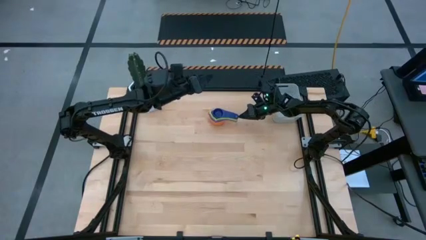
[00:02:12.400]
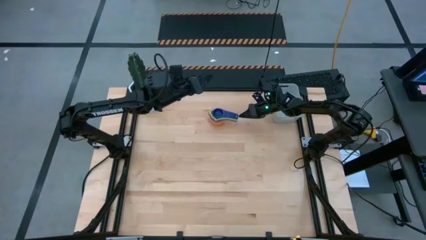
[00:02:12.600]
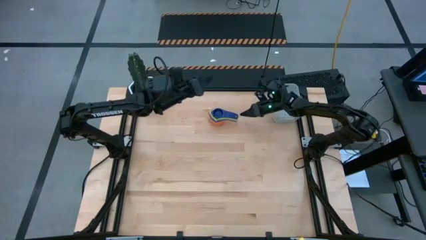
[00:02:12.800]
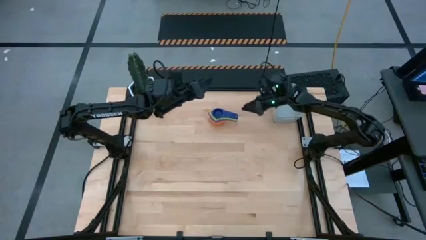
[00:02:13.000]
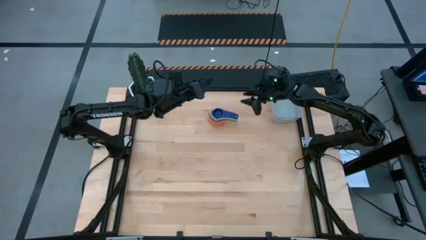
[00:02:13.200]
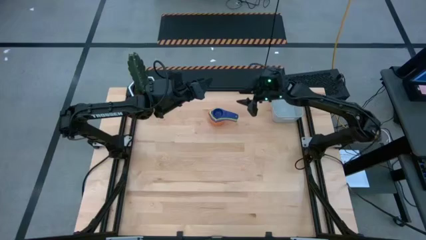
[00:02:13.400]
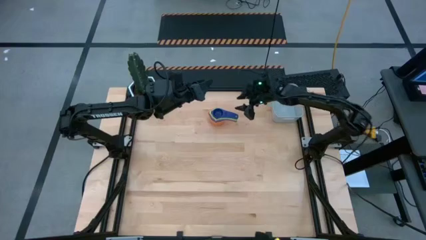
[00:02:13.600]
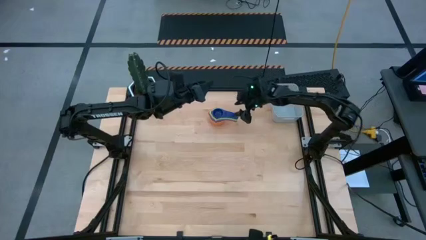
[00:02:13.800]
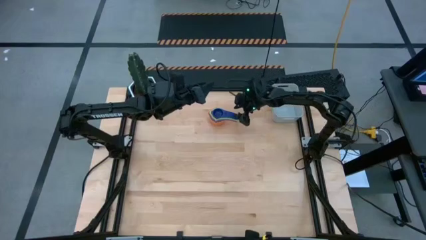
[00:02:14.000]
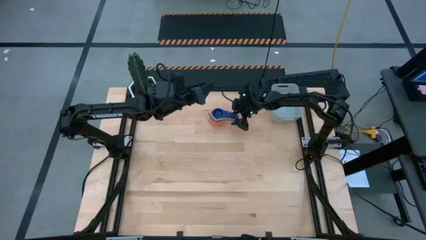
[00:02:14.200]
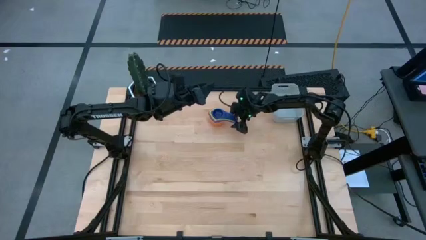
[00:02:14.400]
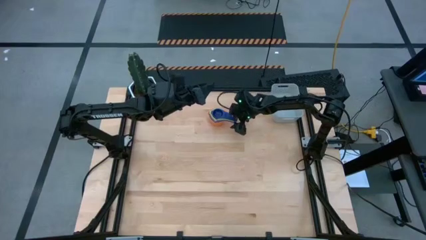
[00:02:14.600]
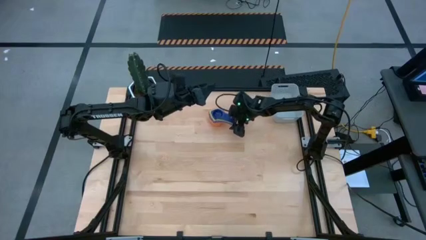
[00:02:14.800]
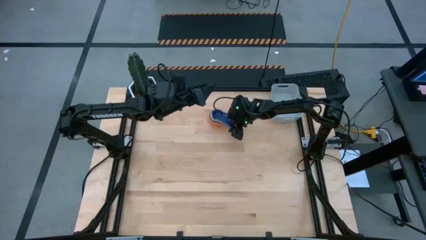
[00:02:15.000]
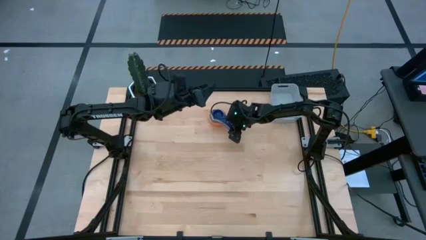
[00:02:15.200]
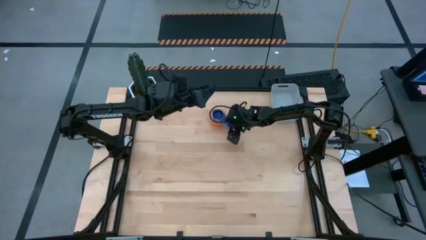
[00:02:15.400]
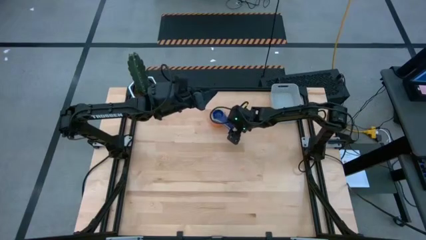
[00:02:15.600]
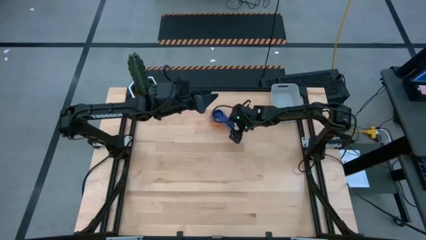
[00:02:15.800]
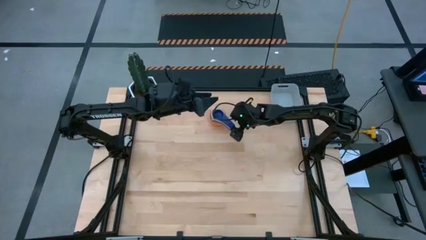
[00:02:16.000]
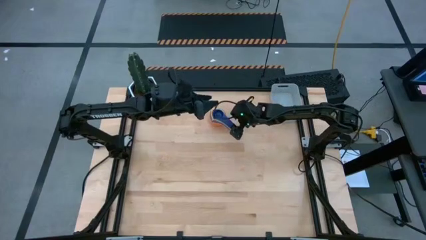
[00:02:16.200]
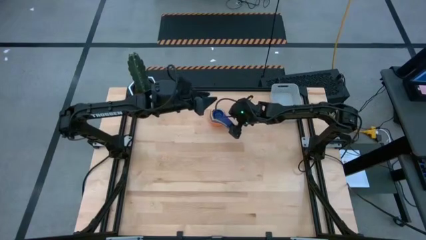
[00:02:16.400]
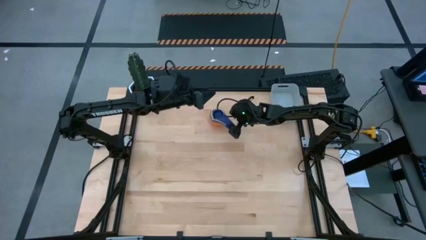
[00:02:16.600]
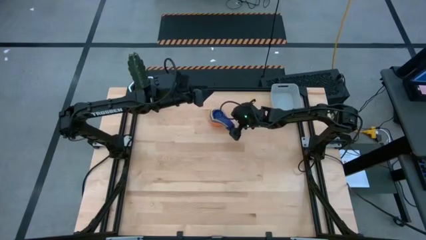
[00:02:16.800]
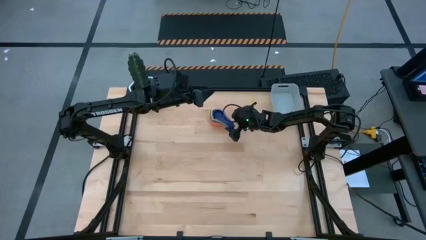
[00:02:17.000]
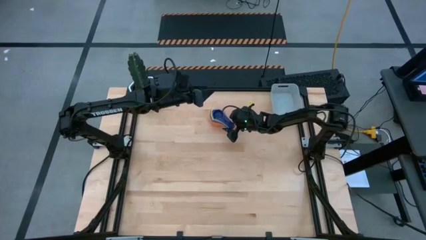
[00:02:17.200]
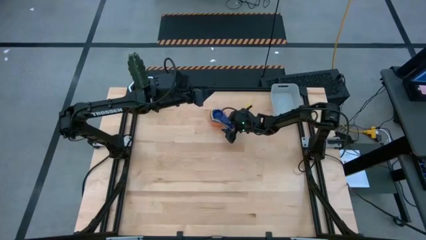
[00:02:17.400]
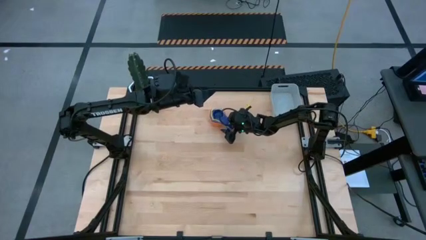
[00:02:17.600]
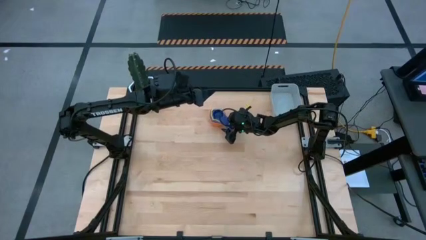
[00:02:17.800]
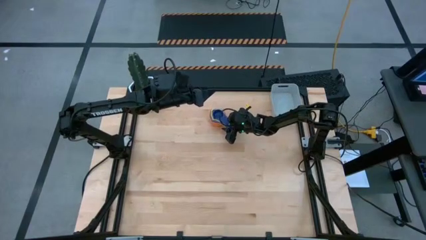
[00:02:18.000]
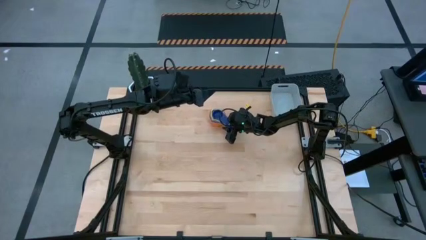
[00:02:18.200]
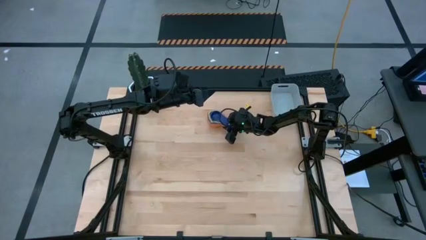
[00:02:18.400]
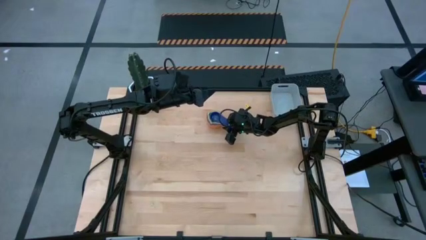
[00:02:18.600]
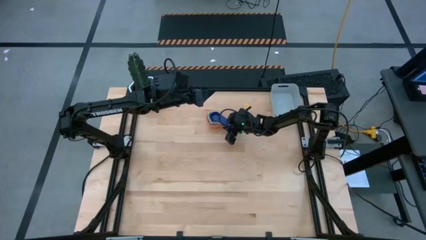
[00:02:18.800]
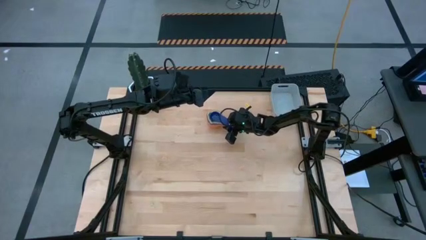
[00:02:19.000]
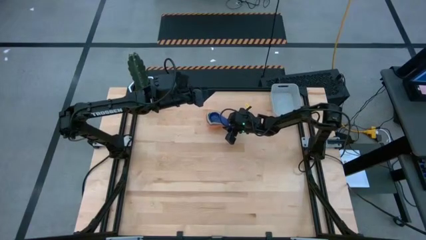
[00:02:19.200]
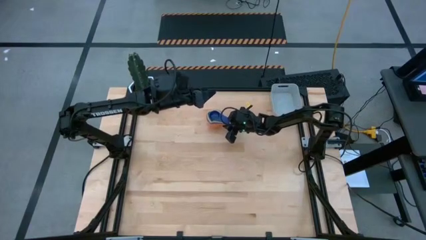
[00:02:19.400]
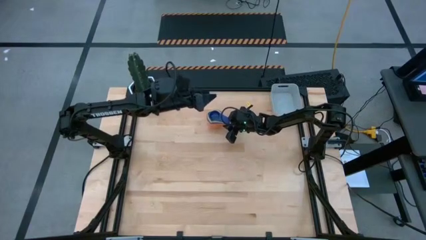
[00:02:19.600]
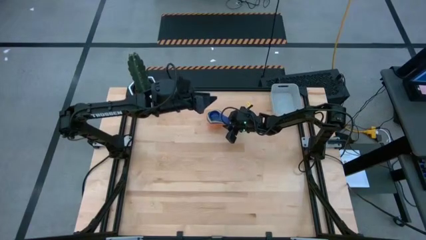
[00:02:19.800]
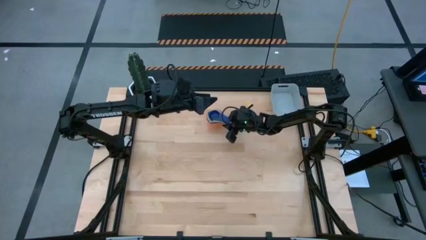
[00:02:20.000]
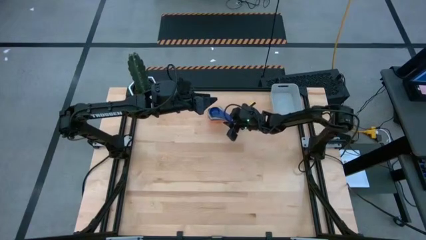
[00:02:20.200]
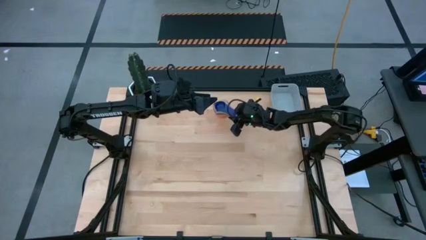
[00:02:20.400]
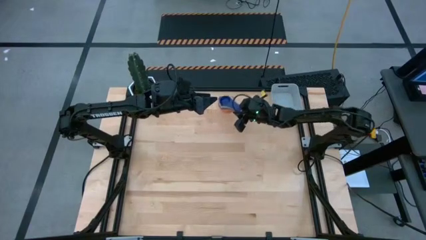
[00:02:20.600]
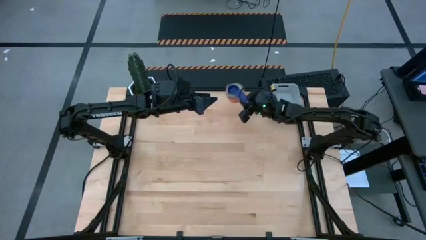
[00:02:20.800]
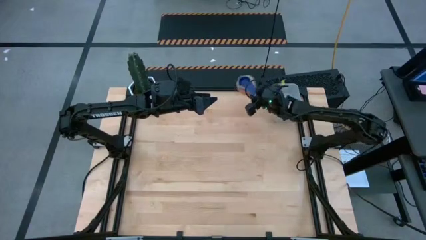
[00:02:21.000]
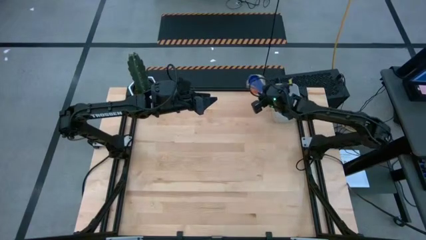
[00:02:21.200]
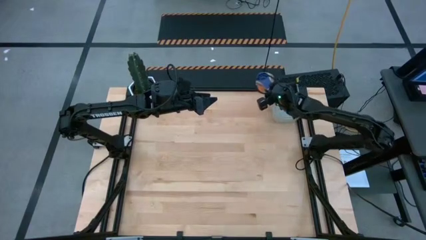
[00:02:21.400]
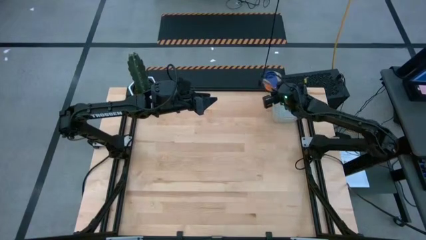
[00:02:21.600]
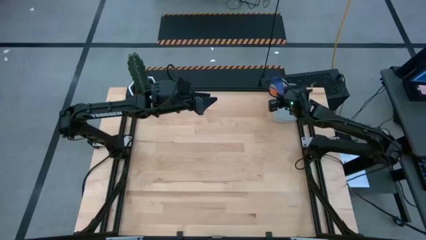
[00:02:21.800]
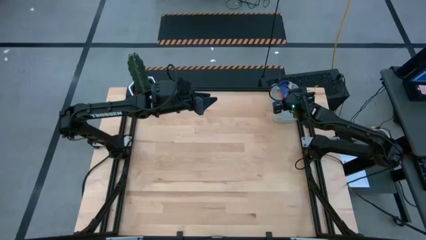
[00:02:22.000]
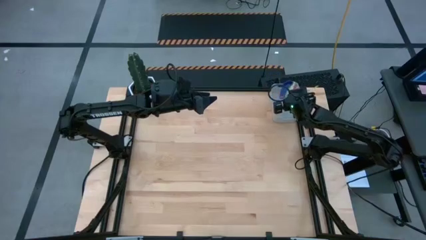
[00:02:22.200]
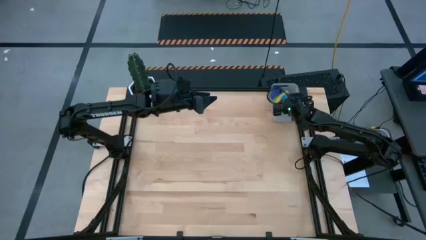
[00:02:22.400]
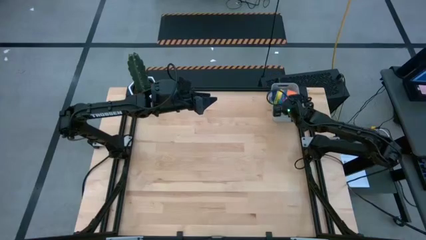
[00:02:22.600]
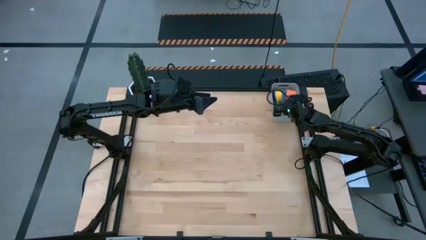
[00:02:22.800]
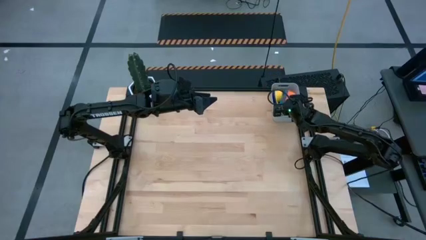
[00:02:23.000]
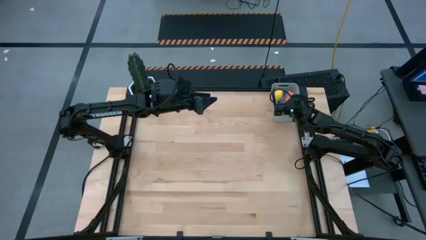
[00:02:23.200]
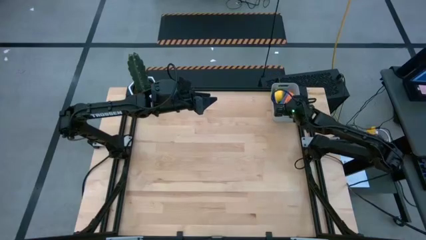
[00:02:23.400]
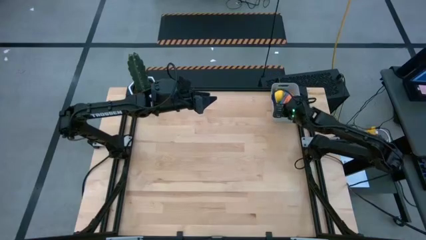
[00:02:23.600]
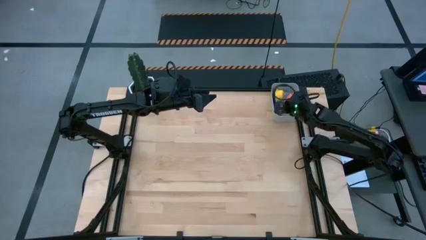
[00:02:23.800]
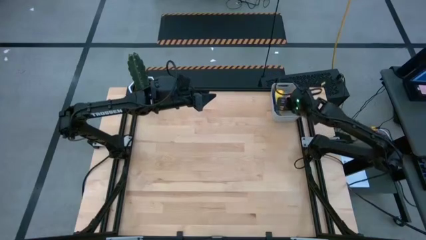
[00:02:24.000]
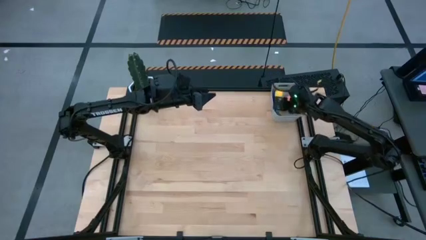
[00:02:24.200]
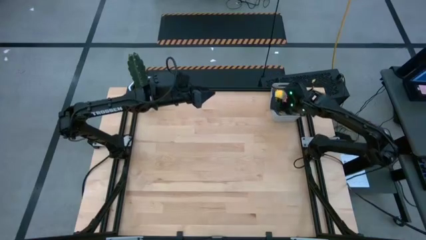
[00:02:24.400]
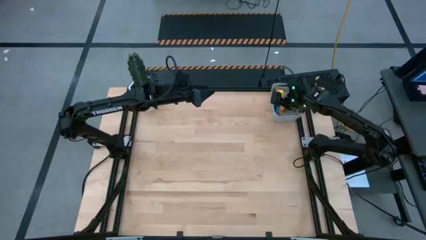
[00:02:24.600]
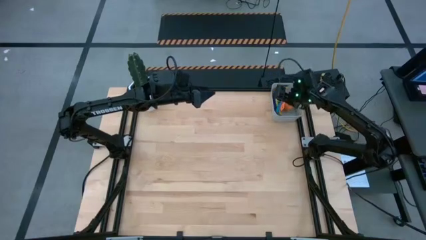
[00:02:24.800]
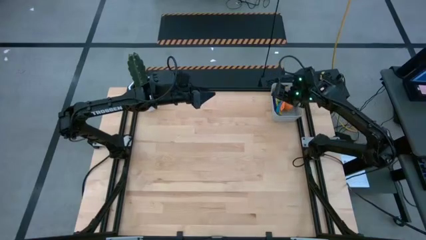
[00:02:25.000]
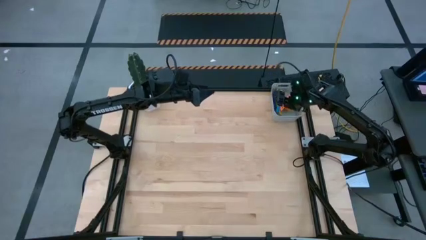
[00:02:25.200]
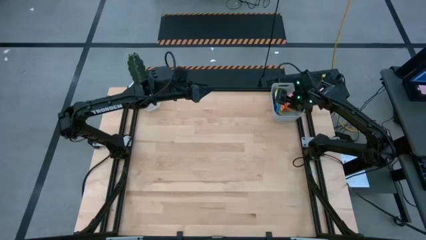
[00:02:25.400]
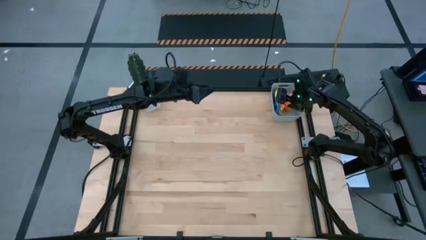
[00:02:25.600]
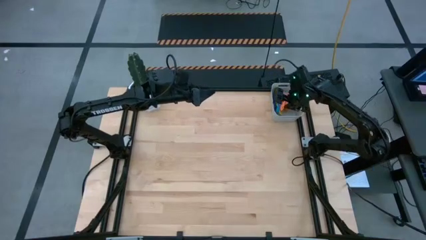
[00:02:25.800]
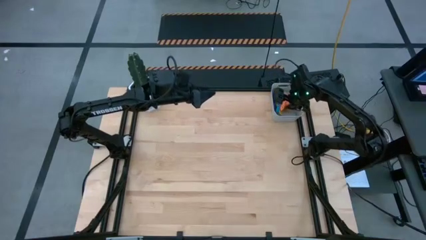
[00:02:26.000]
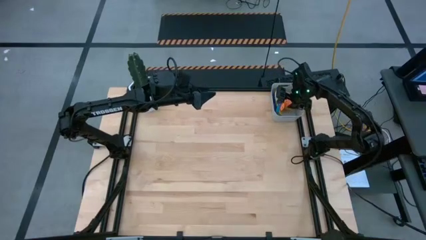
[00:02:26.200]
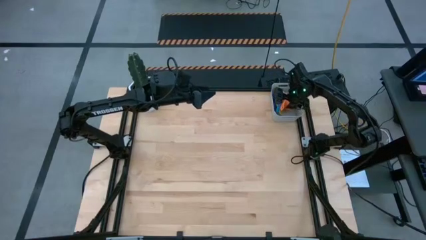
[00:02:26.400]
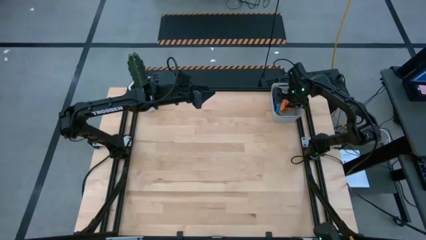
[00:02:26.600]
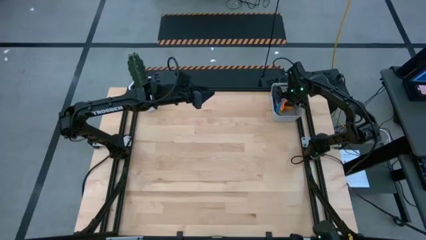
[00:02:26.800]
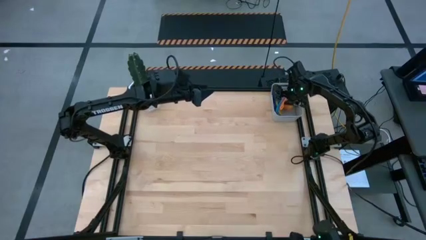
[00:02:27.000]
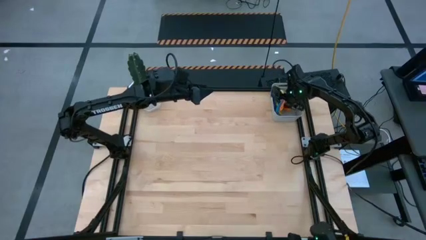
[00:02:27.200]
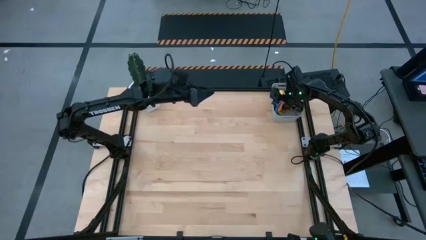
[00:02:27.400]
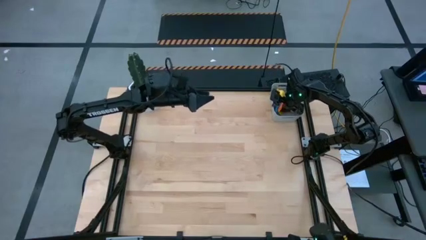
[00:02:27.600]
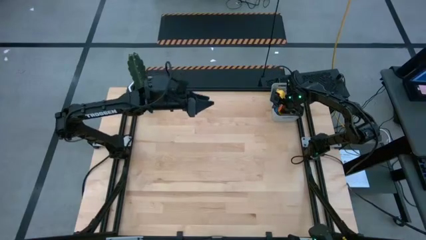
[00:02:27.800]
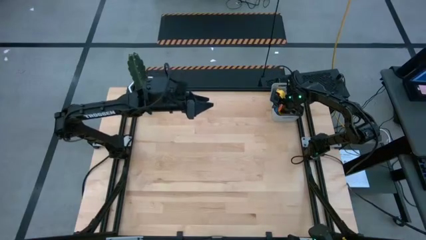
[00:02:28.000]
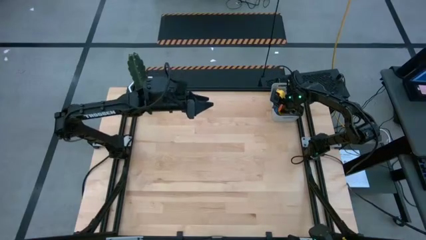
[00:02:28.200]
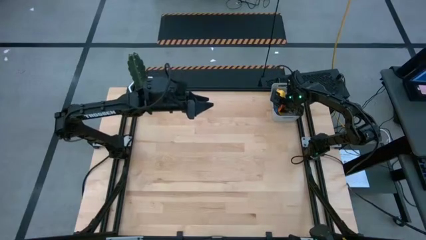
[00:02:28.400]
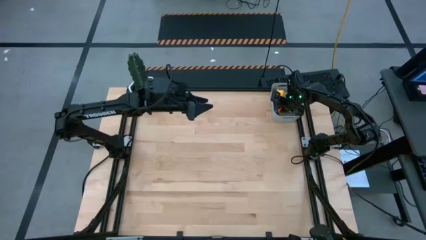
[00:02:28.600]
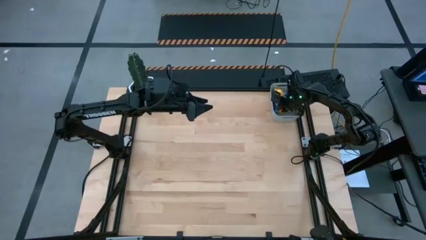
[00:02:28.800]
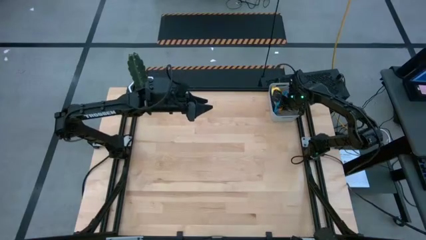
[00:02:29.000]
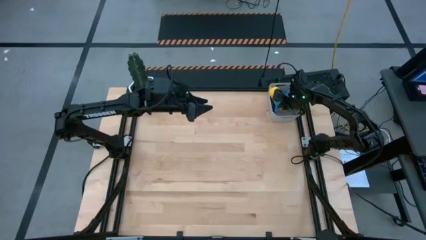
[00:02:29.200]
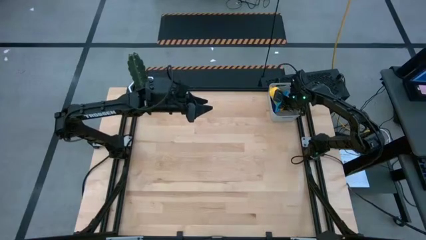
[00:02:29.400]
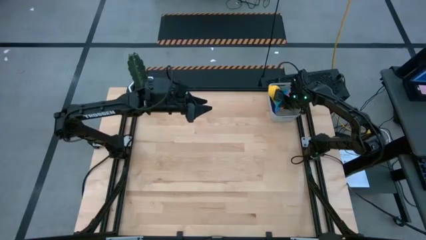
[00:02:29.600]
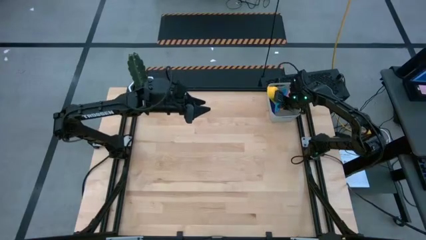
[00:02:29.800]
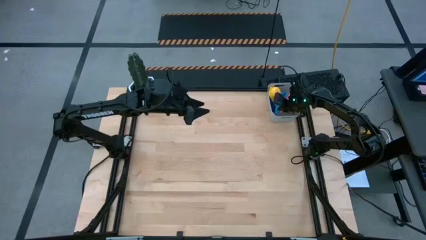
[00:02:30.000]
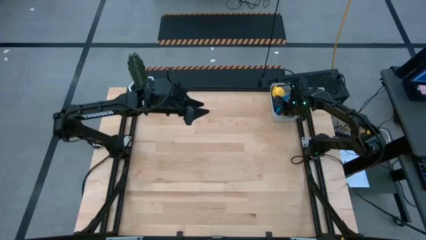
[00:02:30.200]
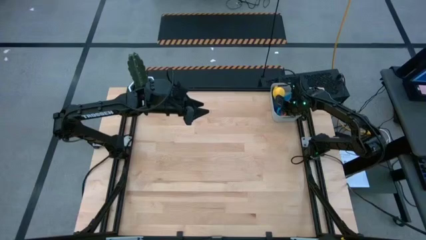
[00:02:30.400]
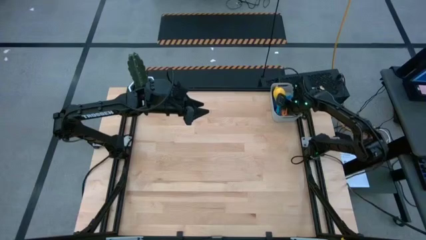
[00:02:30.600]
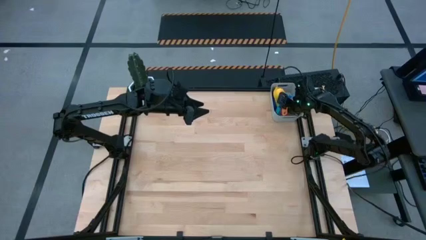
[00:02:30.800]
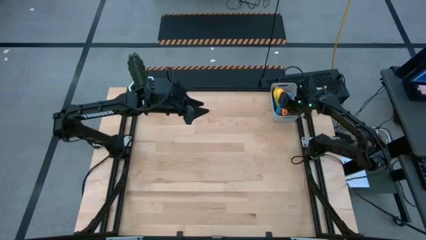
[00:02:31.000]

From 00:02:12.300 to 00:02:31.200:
Task: Nest measuring cups in basket
Put the stacked measuring cups into the gray bin
